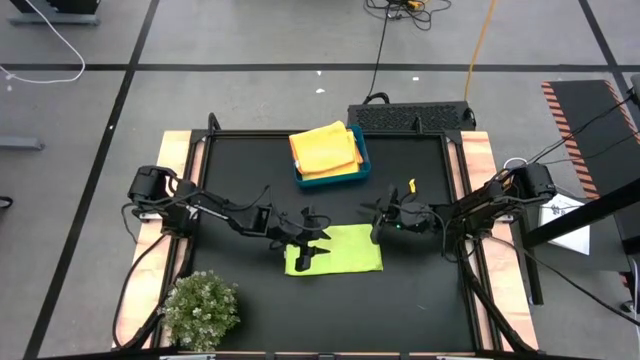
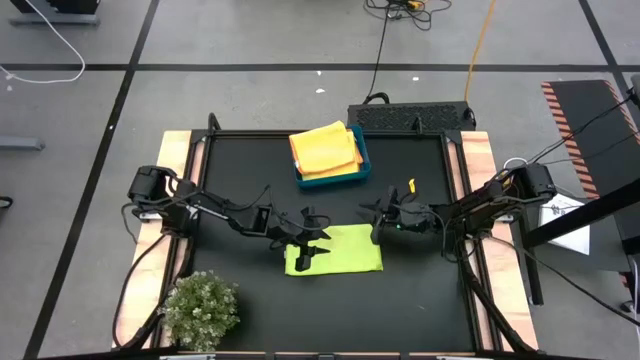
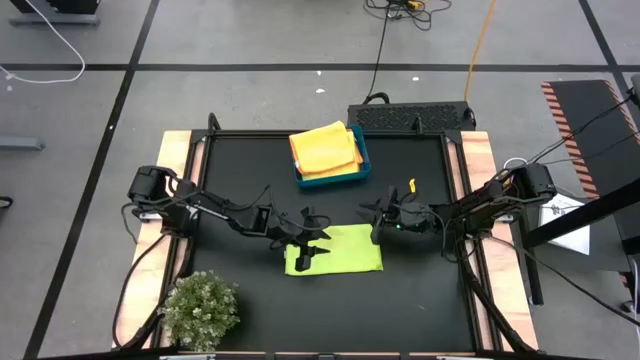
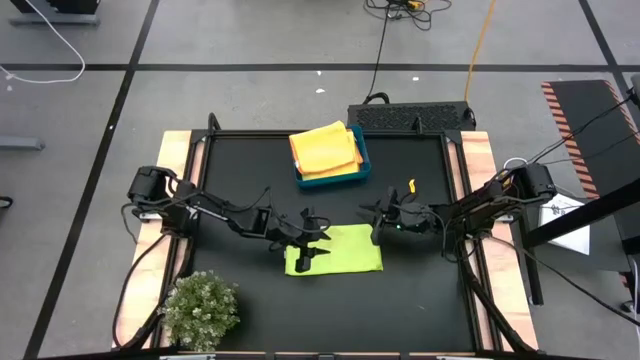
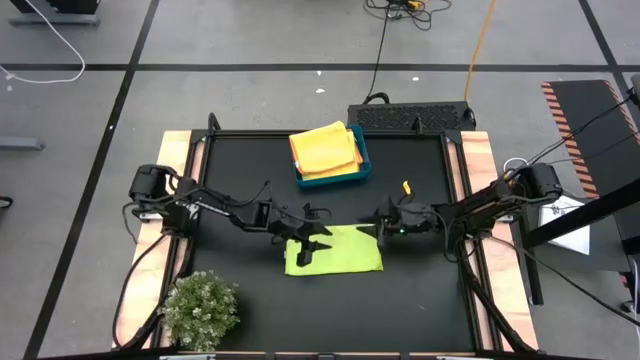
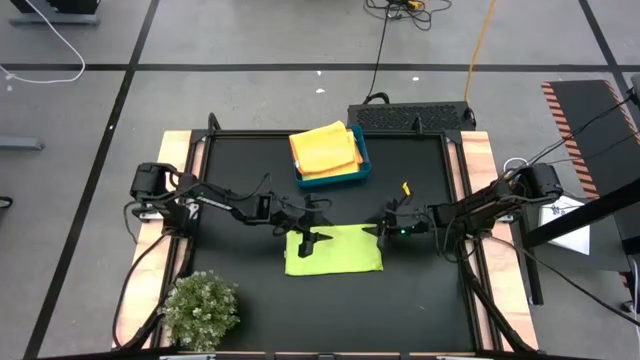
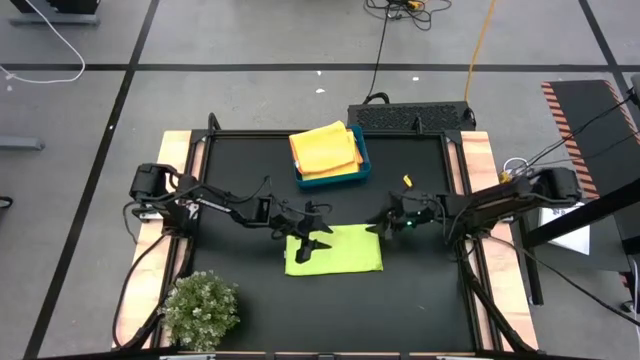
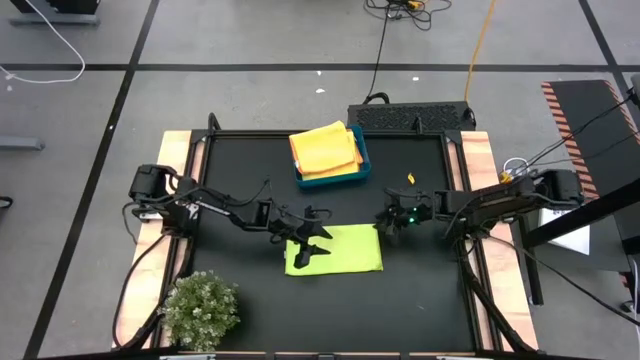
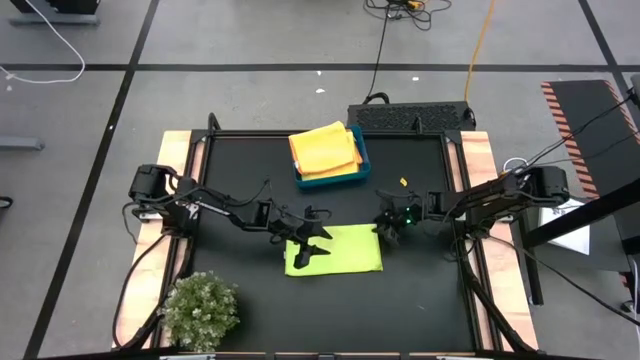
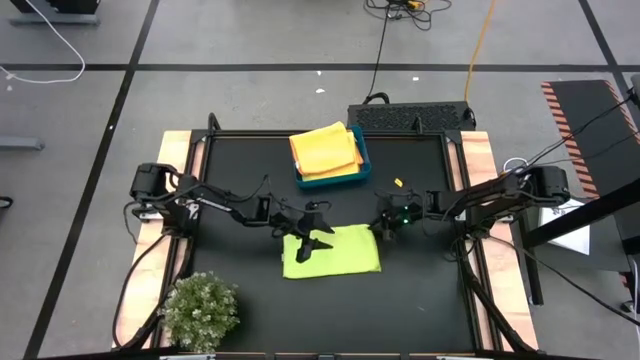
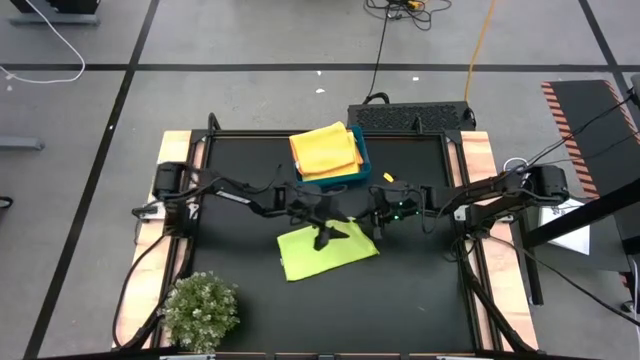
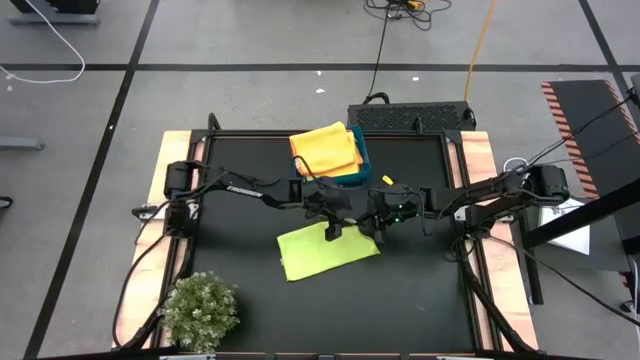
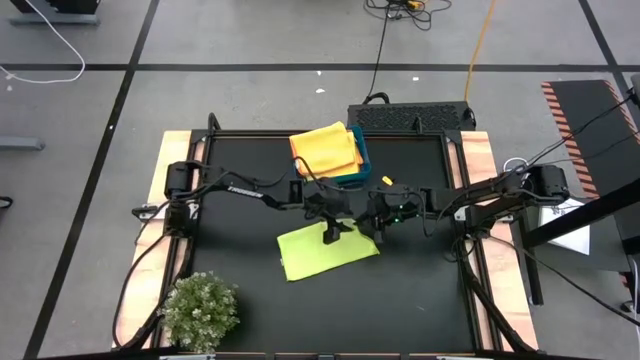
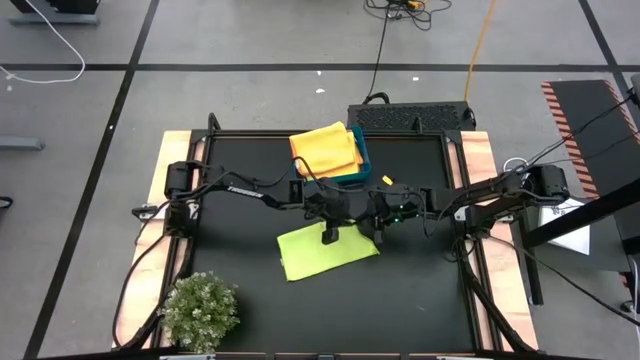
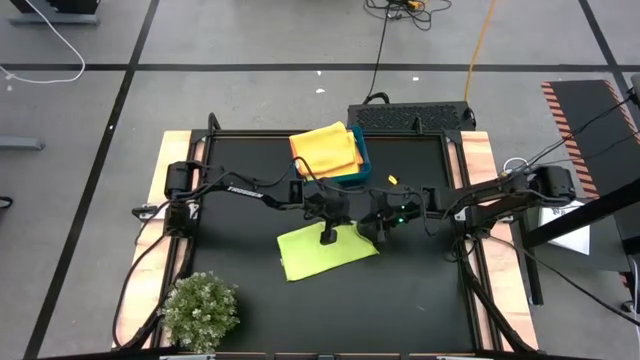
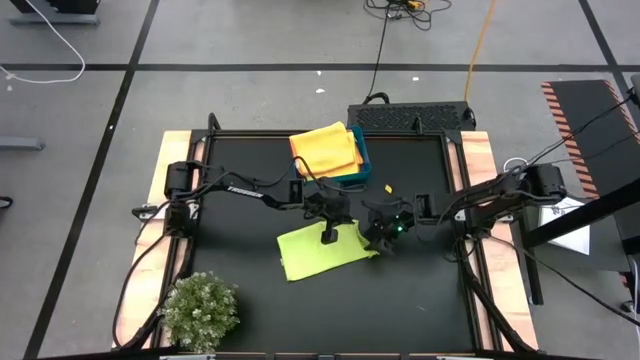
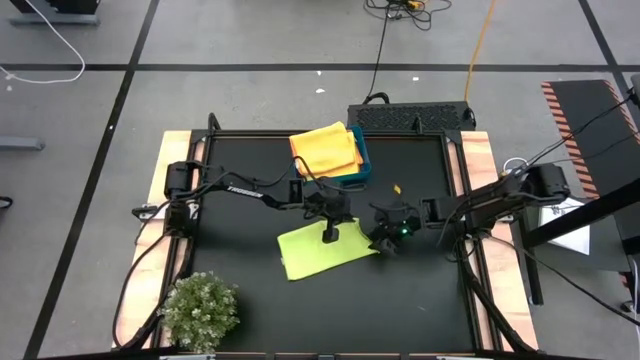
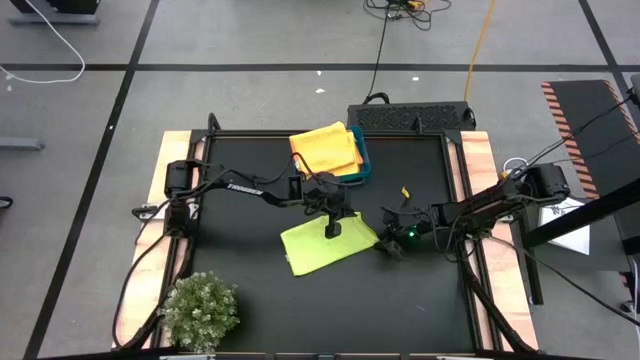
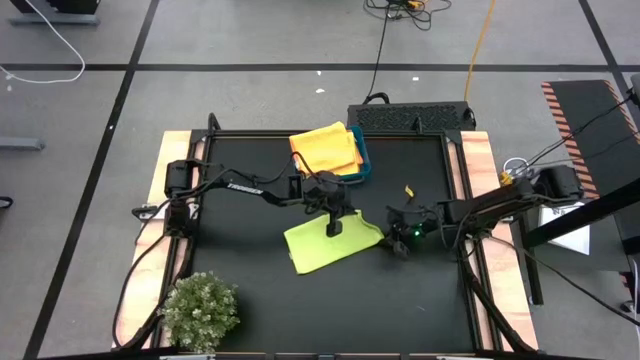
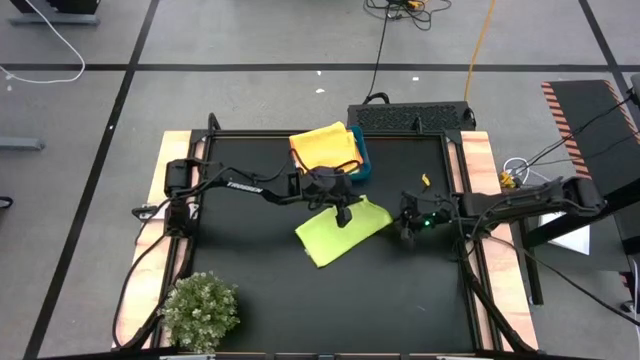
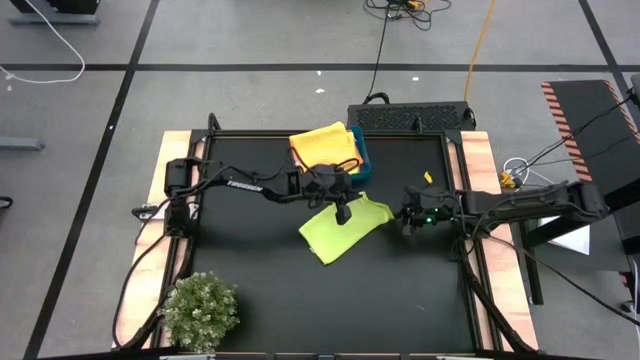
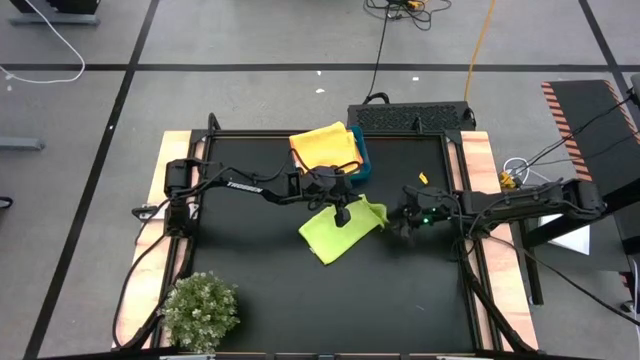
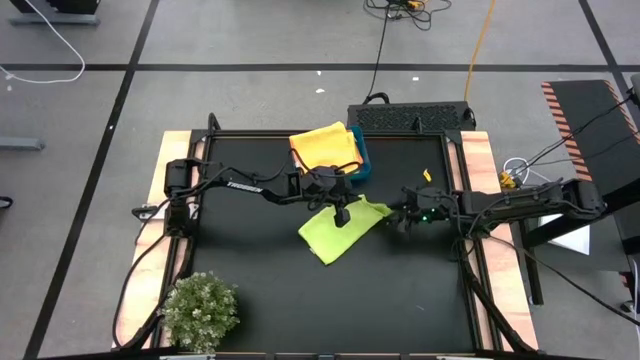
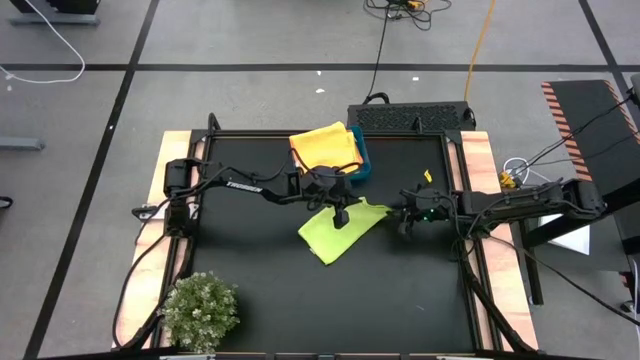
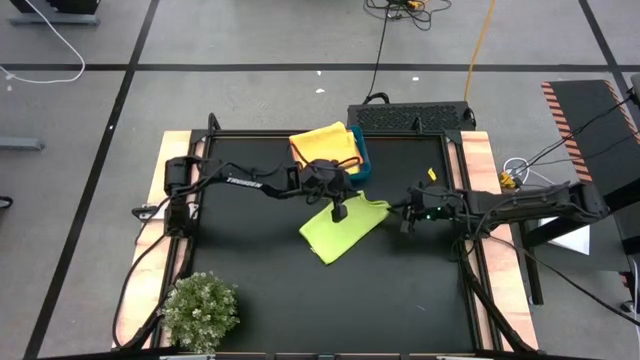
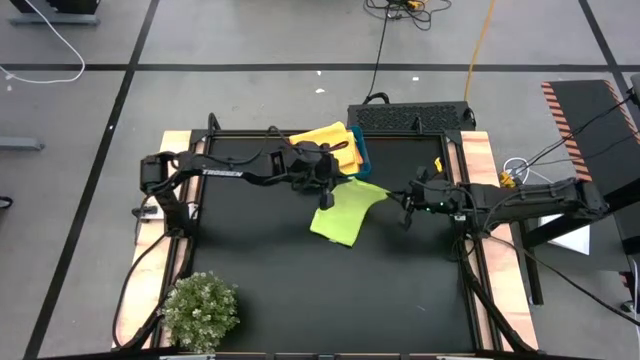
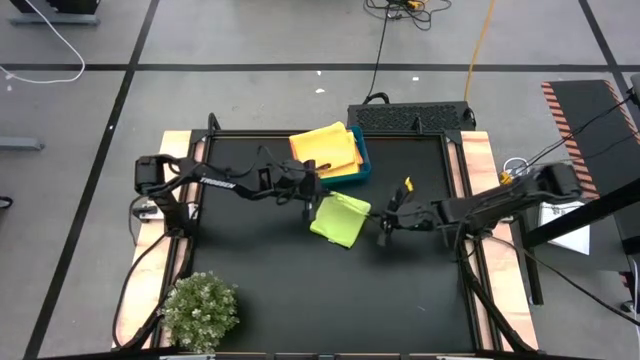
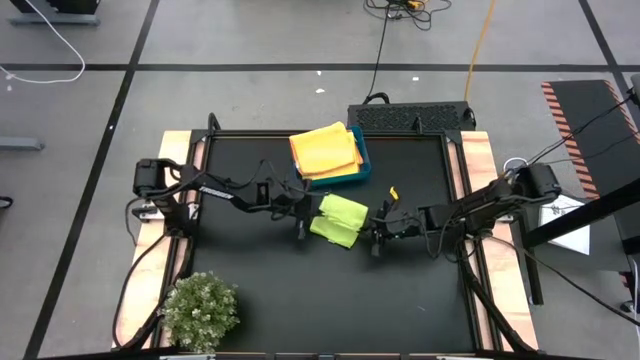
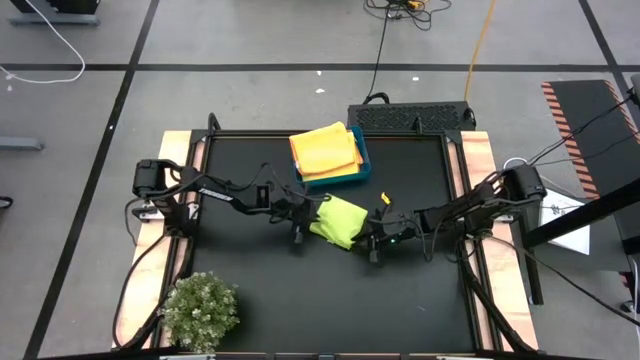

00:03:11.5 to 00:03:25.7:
Task: Fold microfiber towels
Fold the green microfiber towel

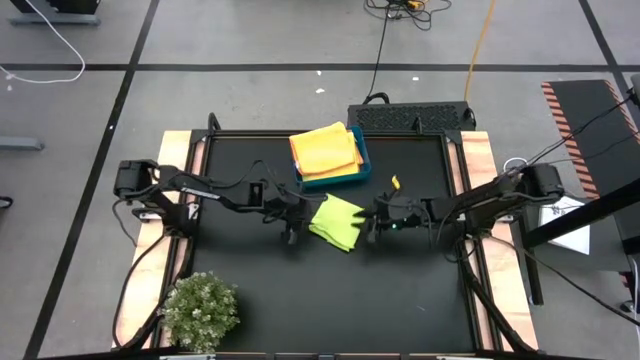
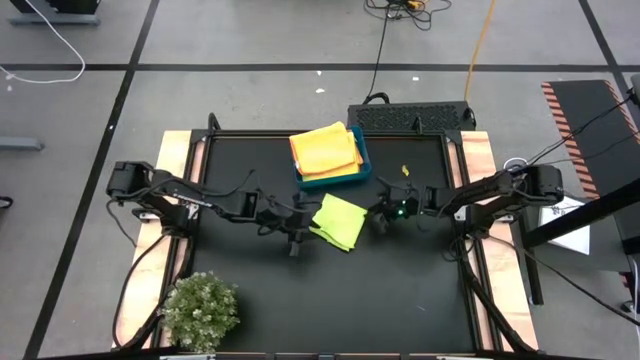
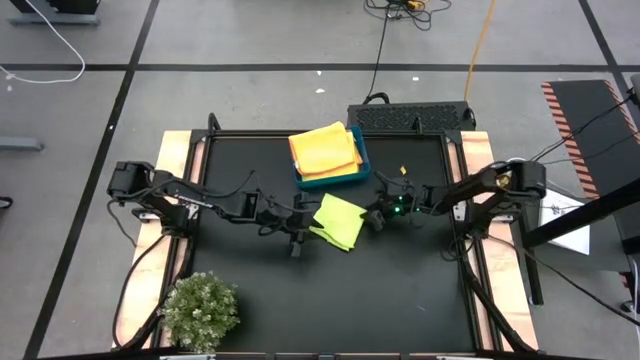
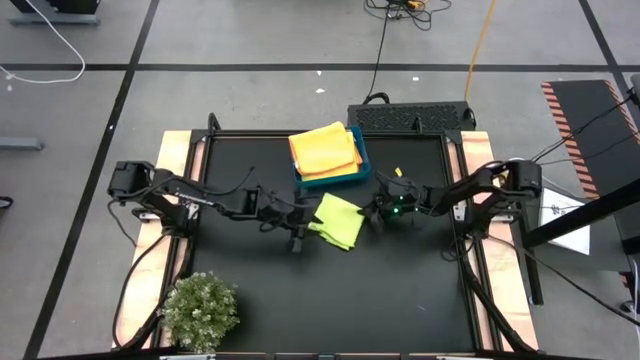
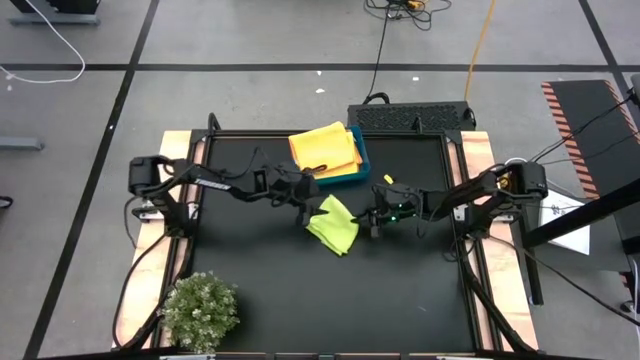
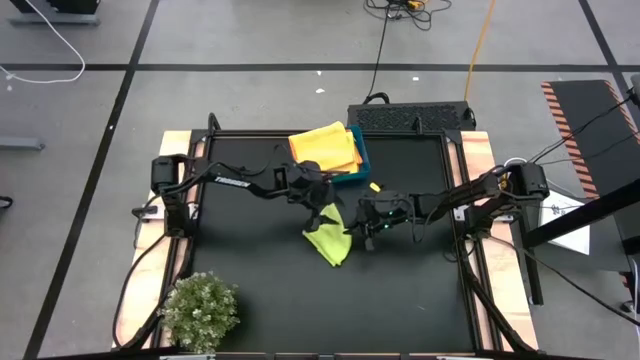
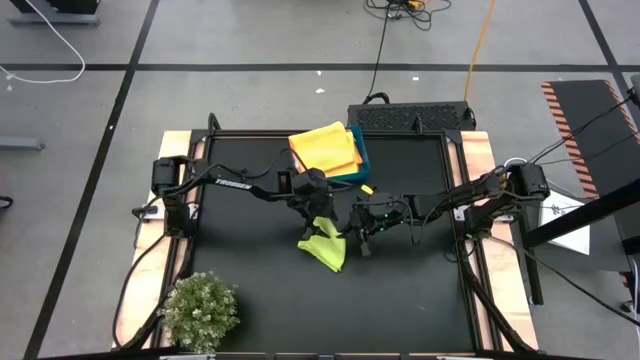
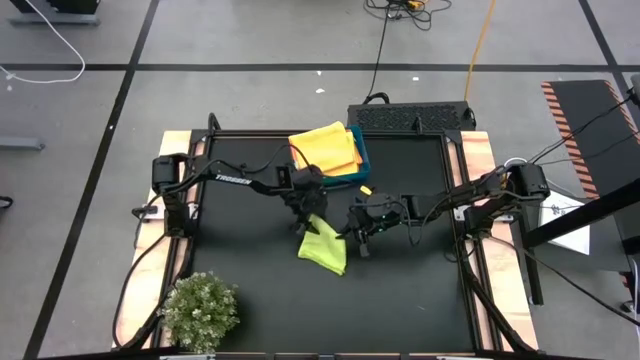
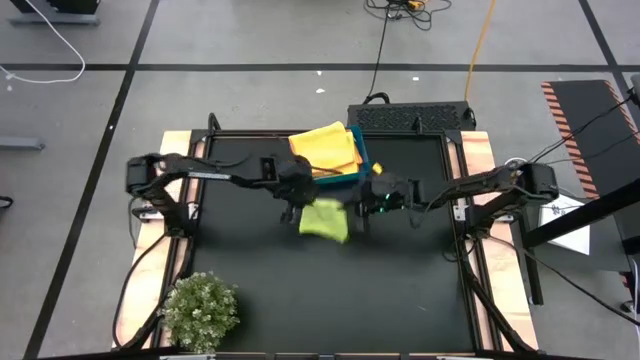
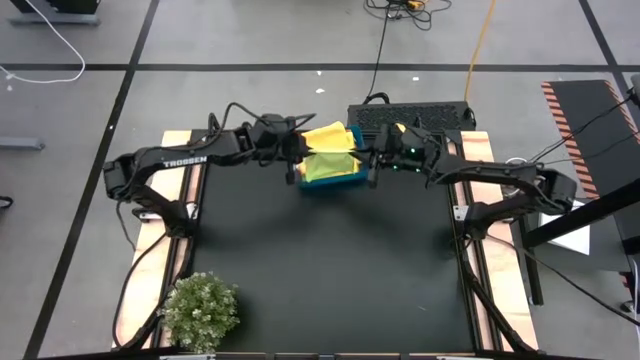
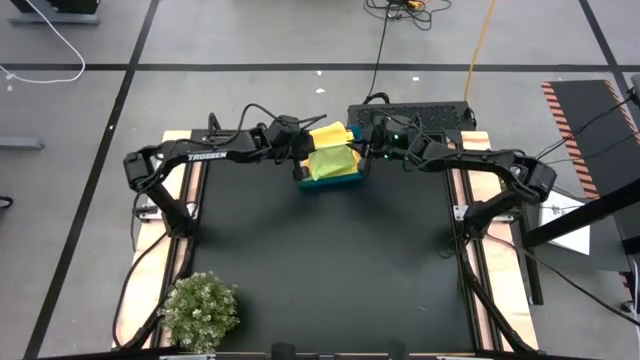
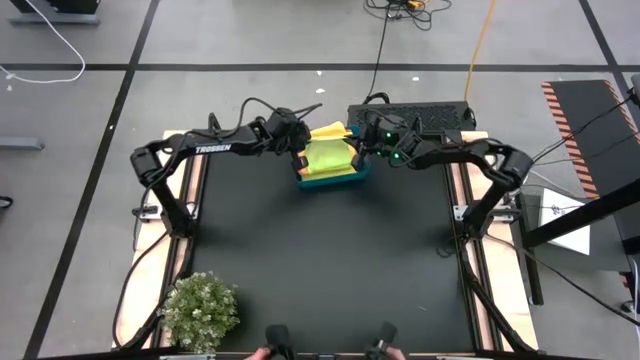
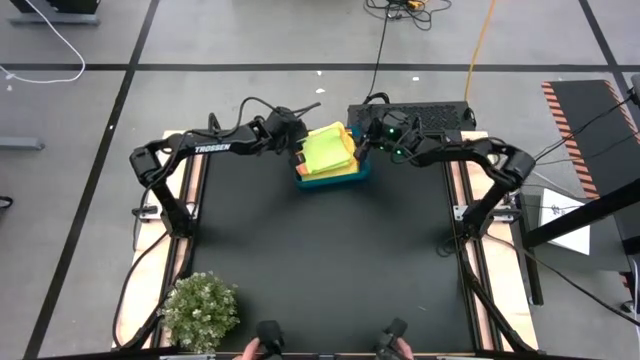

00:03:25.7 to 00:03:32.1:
Put the green microfiber towel into the blue bin

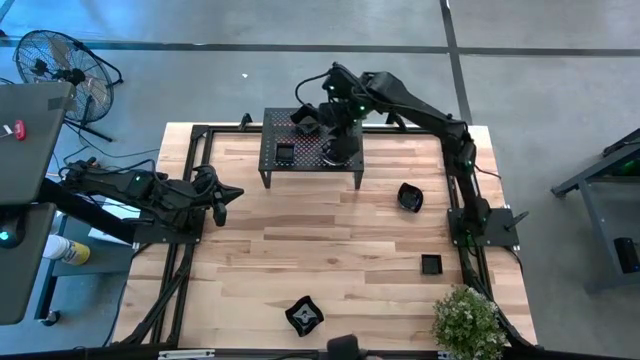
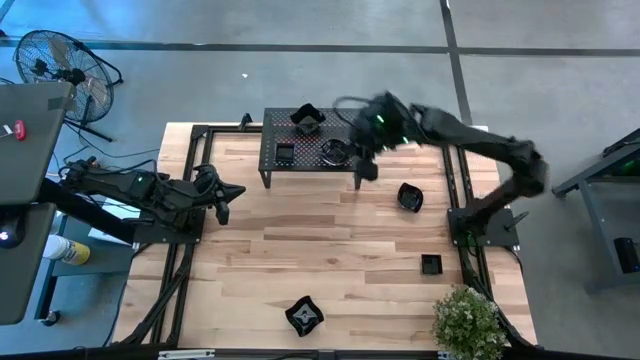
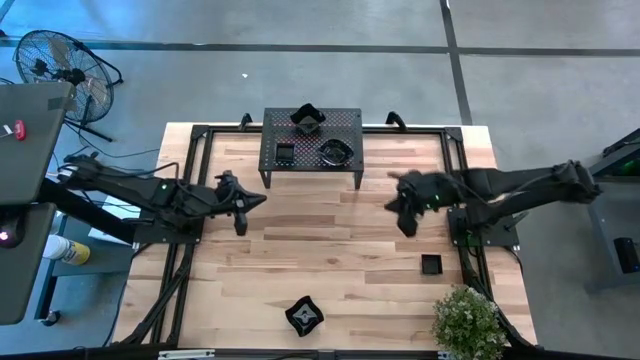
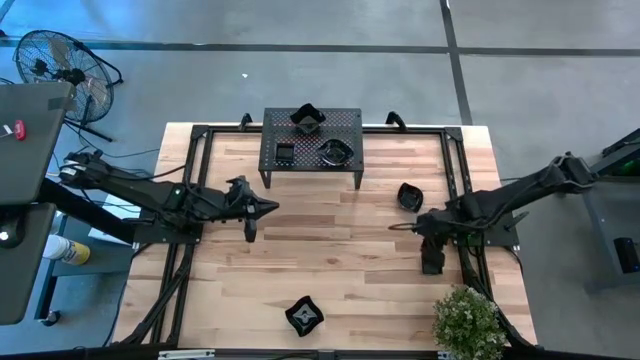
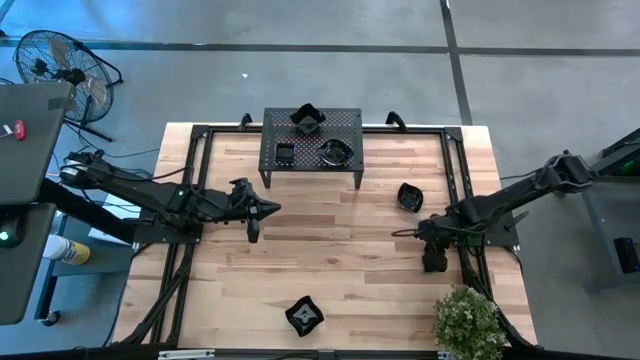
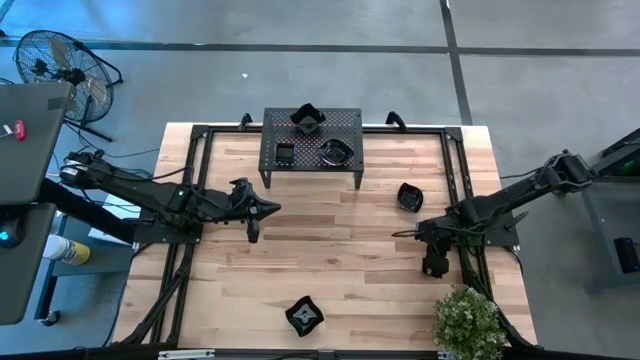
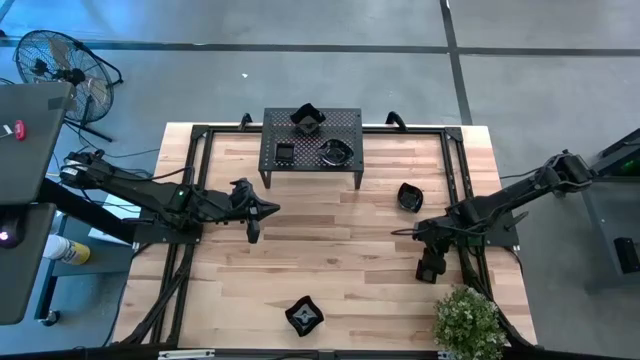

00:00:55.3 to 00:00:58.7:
Task: Pick & Place Mini shaped plates
Stack the black square plate on top of the black square plate on the shelf
